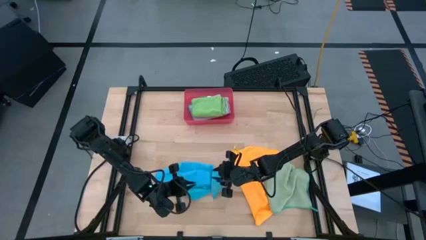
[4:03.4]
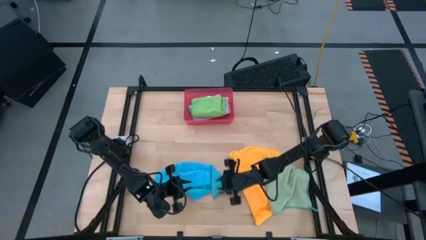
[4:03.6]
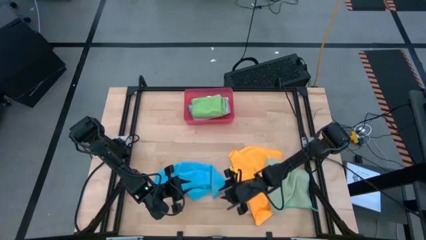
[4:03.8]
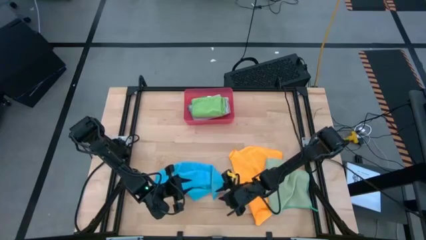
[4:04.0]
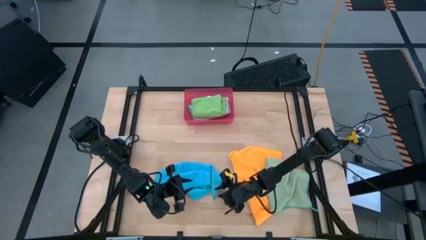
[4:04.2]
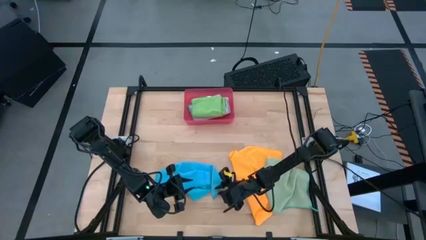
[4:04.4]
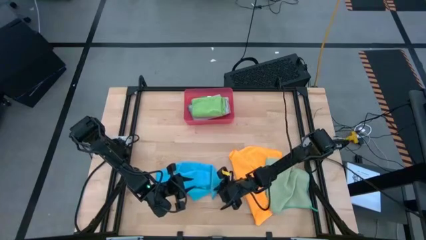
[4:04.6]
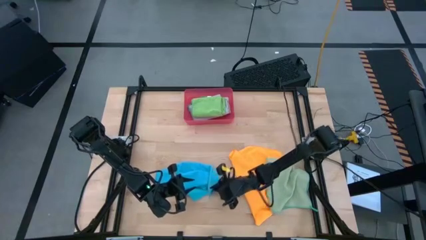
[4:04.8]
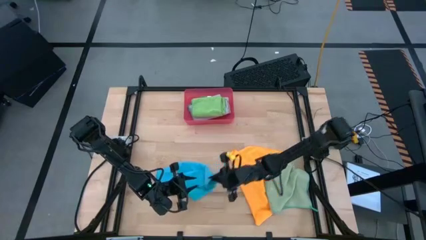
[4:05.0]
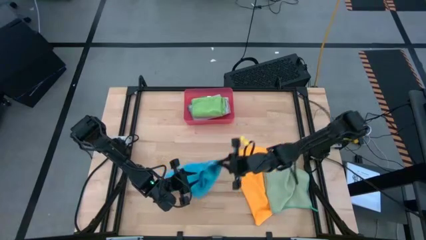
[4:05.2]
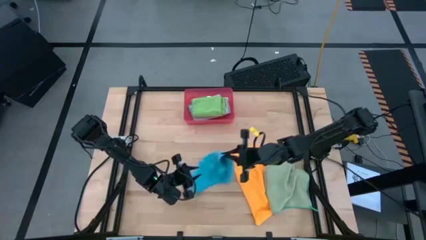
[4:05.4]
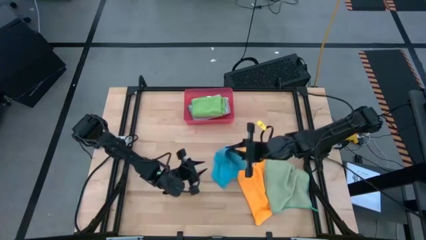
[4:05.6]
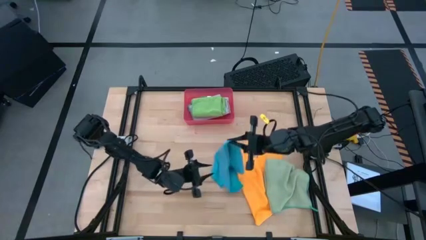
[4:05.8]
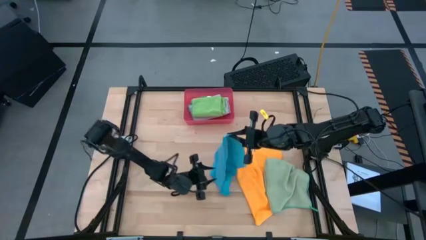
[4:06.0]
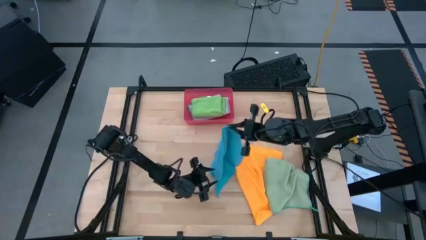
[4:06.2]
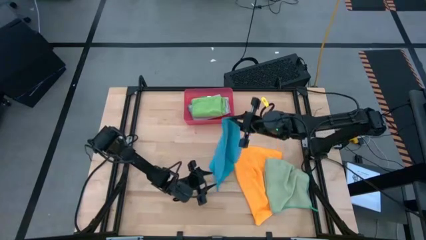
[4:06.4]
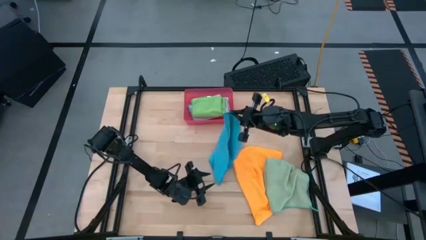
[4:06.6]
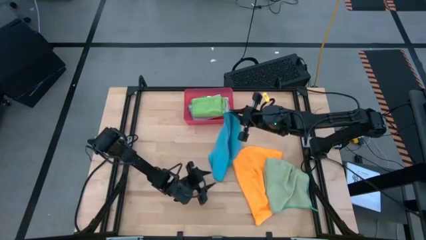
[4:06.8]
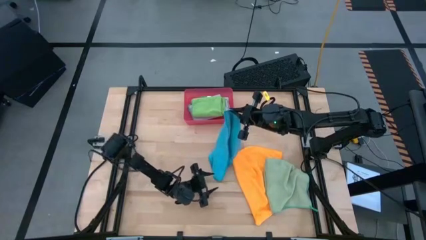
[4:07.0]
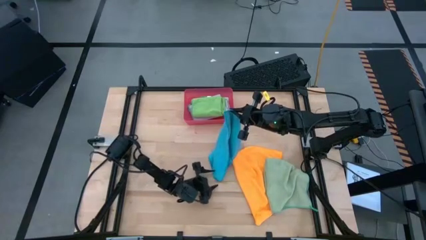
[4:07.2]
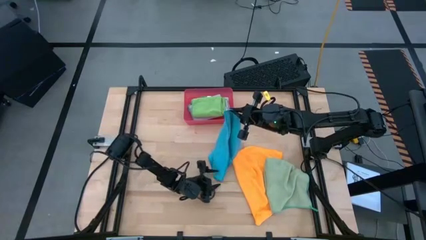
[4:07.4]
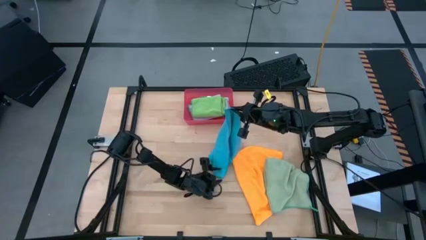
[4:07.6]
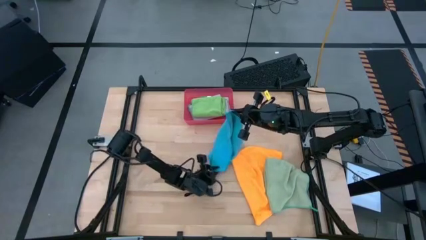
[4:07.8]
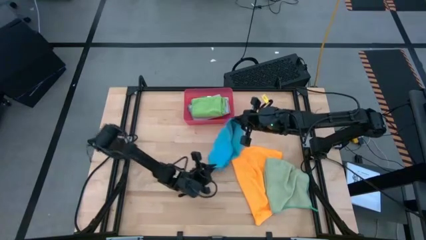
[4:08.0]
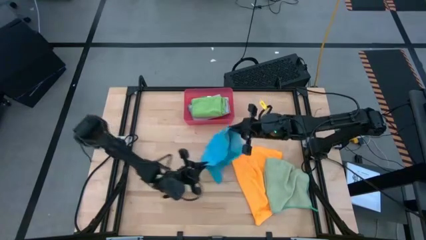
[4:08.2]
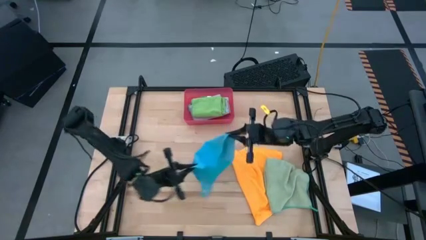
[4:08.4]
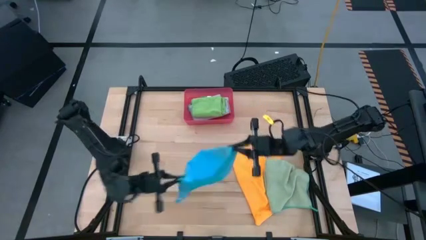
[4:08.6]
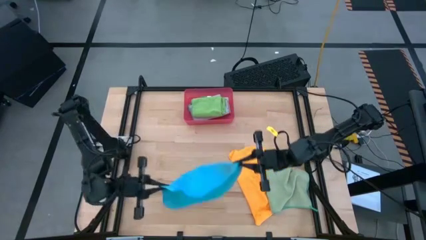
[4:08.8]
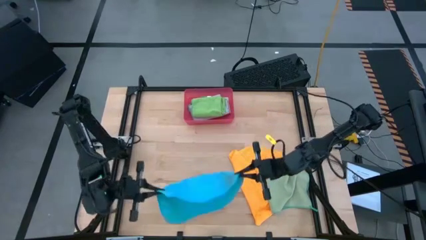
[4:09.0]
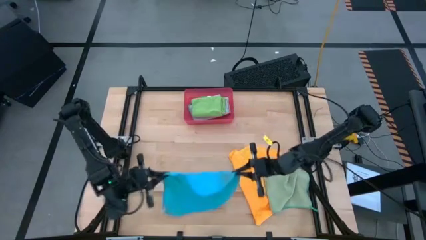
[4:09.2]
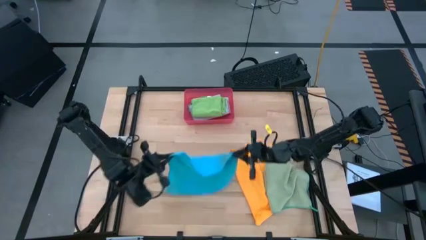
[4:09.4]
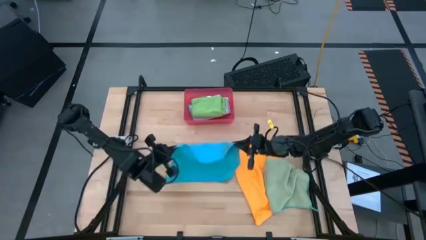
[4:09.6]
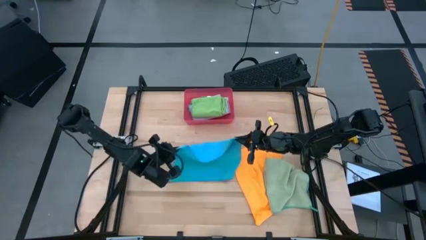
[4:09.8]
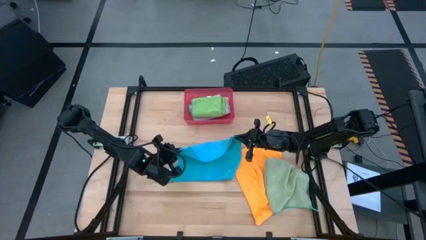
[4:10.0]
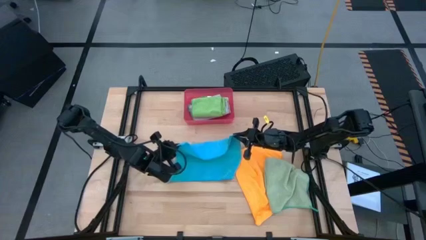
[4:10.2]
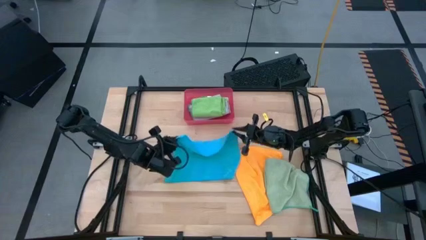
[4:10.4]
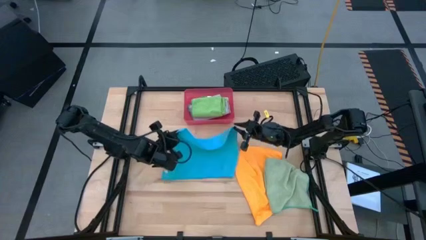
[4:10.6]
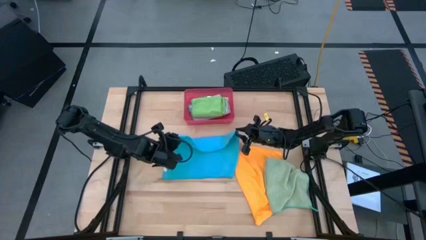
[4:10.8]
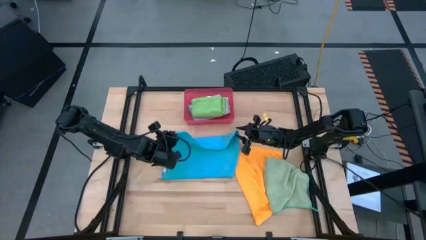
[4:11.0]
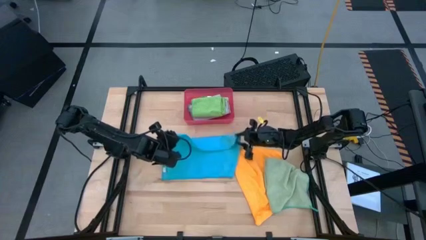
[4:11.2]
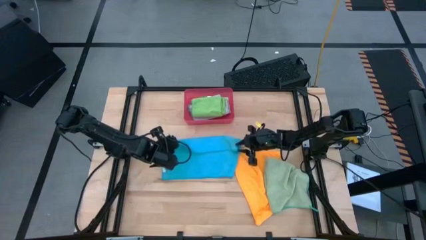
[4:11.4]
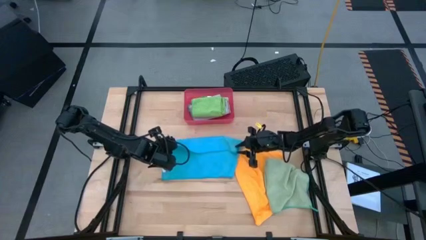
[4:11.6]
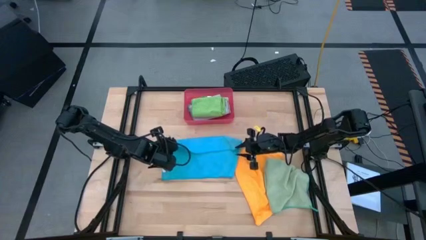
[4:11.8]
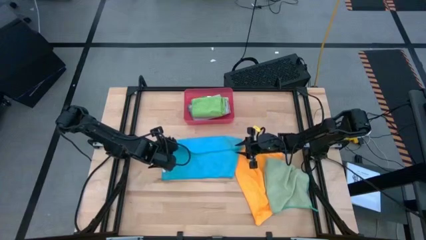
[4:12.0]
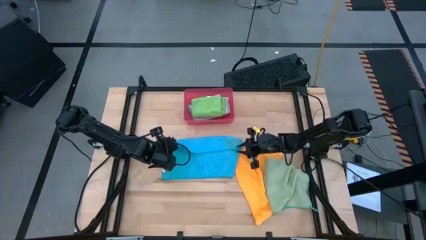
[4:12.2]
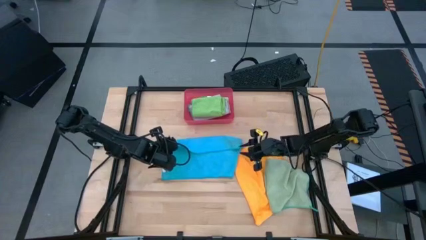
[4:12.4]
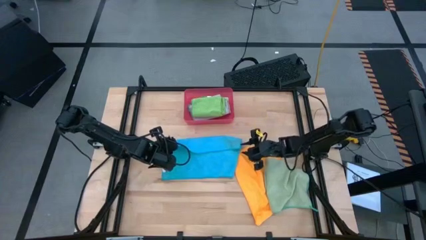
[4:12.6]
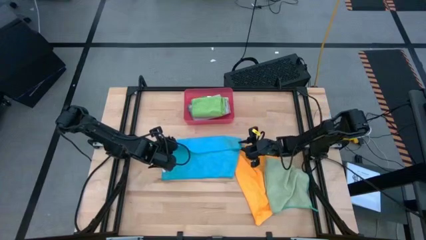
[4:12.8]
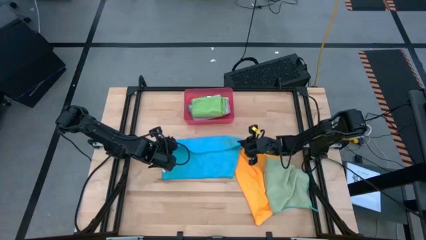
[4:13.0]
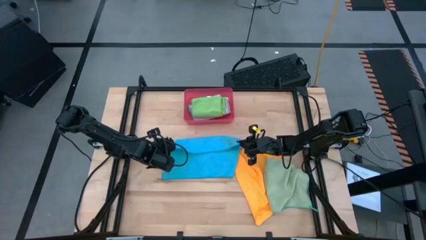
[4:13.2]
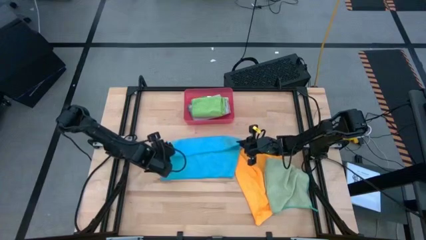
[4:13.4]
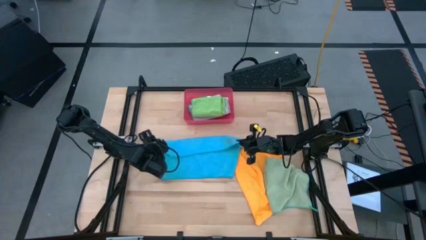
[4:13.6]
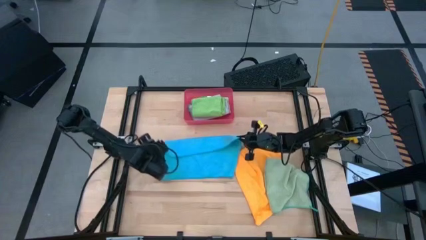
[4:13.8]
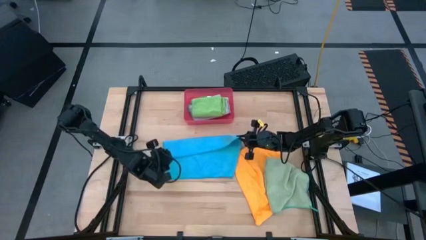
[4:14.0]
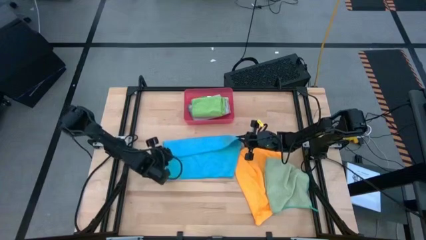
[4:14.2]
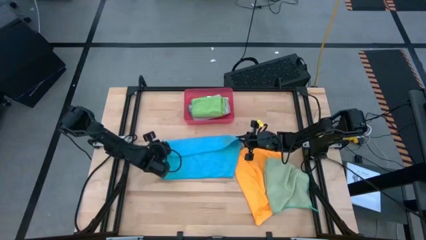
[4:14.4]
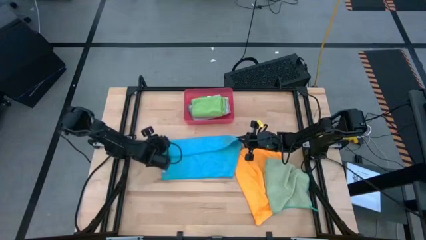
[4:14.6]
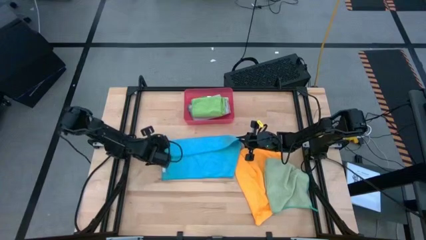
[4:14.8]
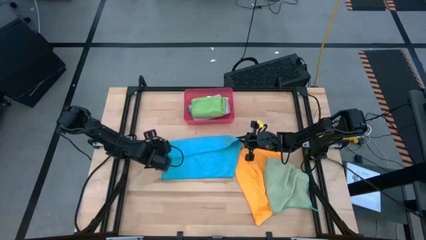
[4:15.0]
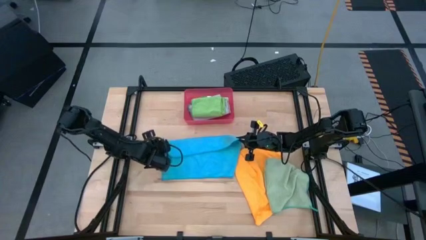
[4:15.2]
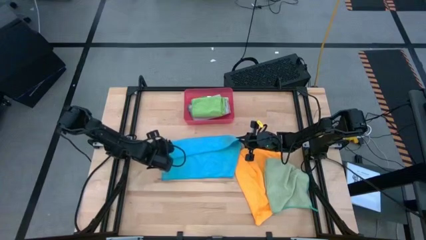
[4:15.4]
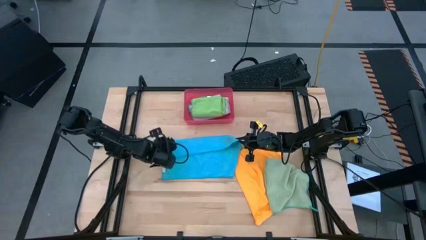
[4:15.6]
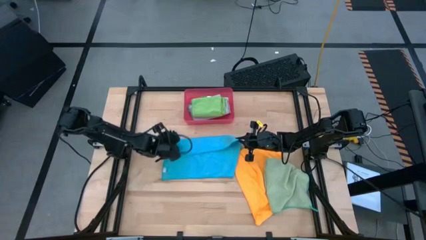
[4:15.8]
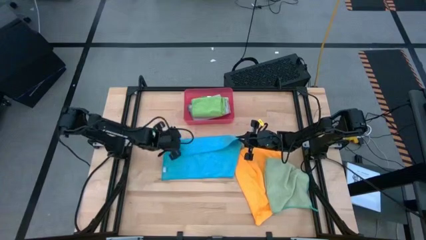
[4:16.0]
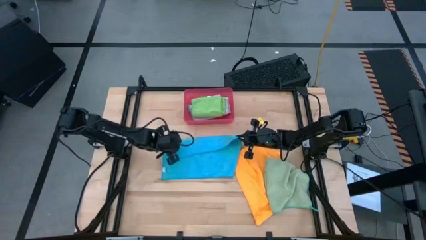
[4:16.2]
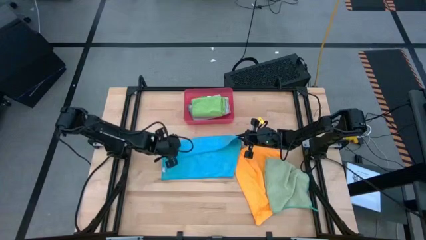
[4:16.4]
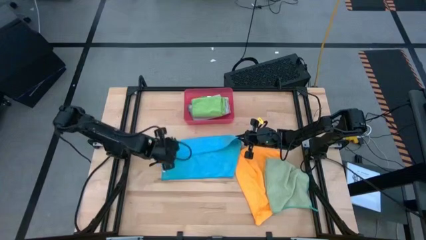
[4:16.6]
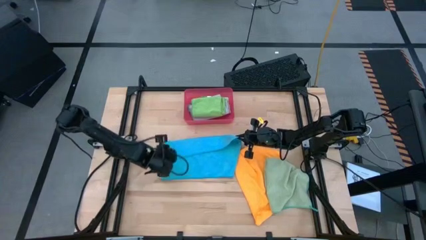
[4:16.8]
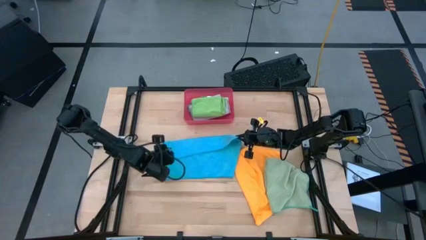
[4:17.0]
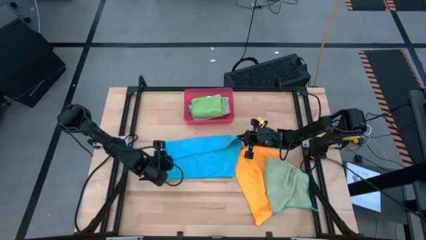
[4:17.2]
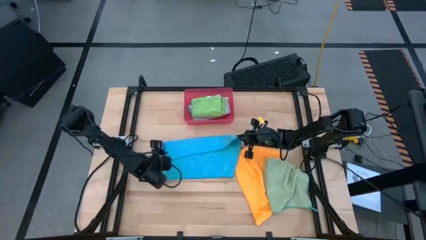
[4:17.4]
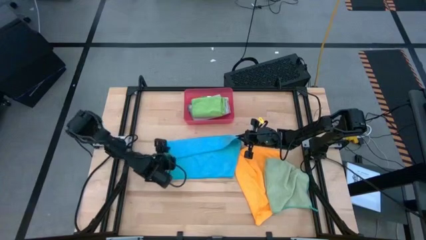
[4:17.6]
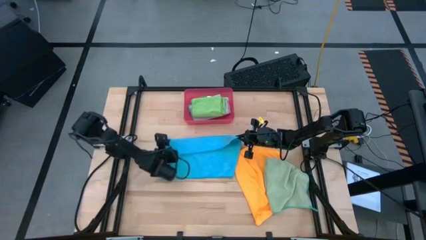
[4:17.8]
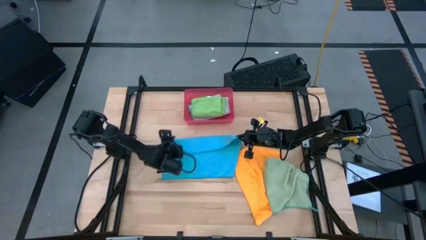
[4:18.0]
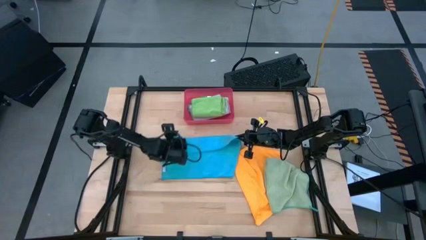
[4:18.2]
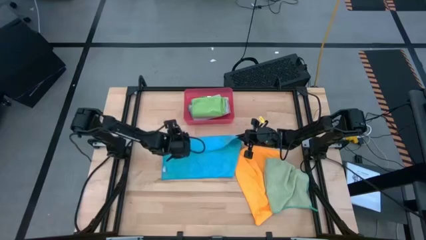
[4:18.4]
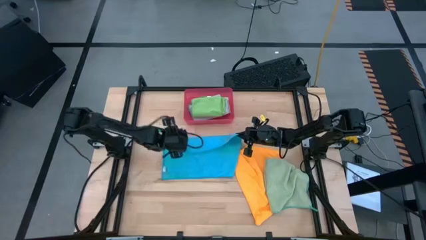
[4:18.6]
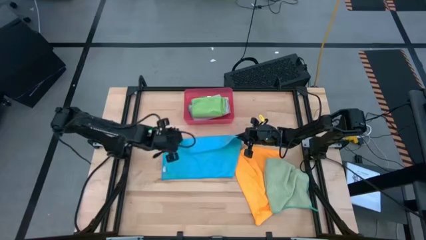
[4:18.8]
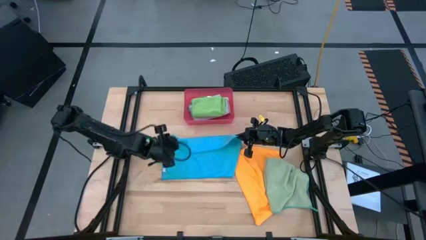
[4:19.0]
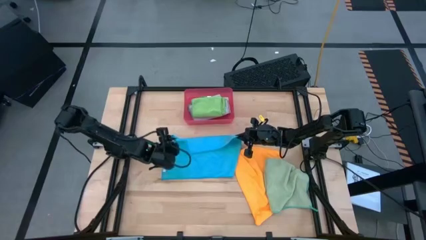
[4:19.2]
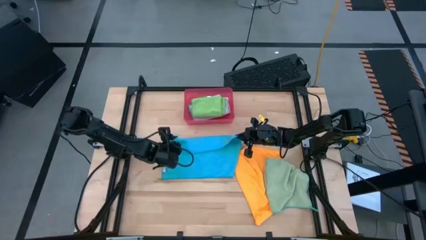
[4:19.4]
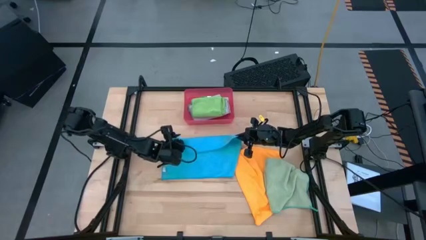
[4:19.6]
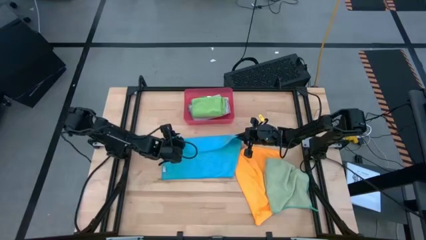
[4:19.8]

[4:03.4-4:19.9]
Task: Fold microfiber towels
Fold the blue towel

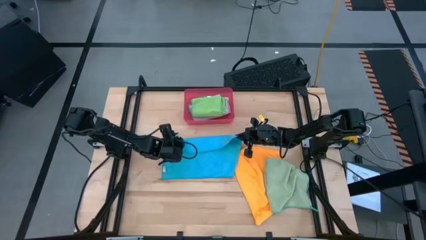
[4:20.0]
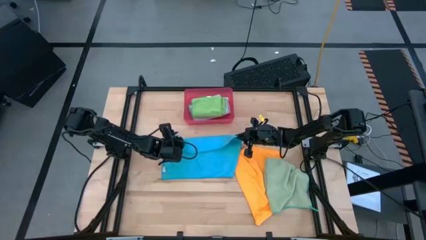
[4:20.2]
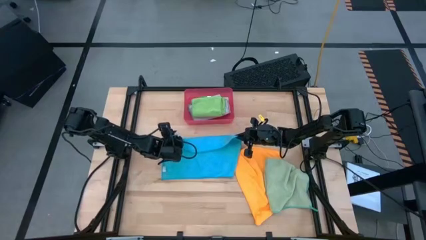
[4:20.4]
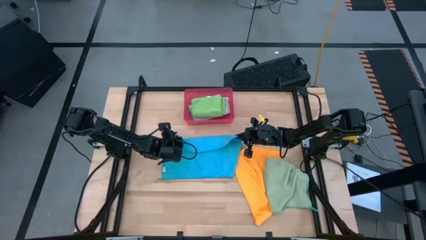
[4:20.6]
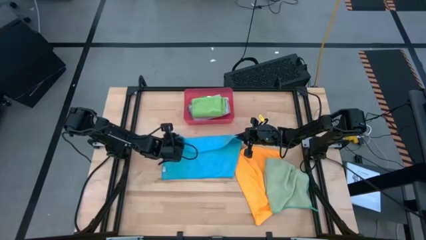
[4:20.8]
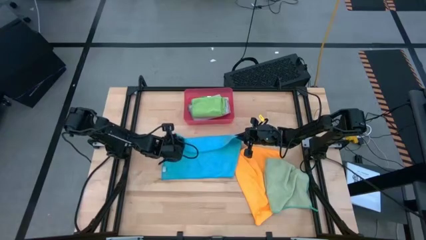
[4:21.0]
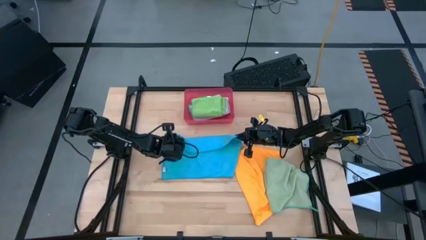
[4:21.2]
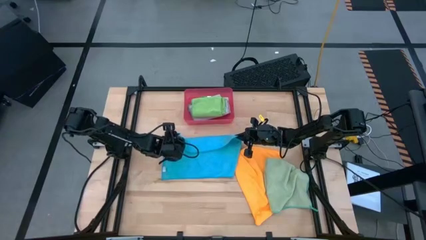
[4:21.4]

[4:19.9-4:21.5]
Fold the blue towel
